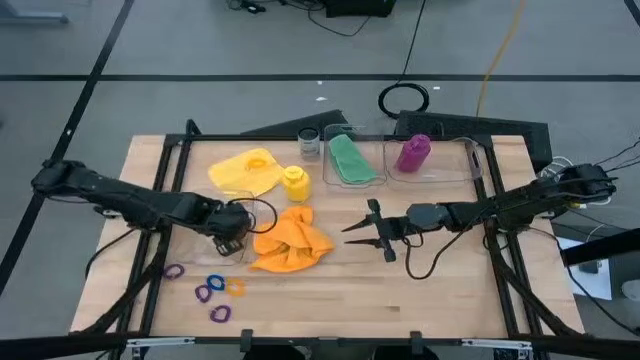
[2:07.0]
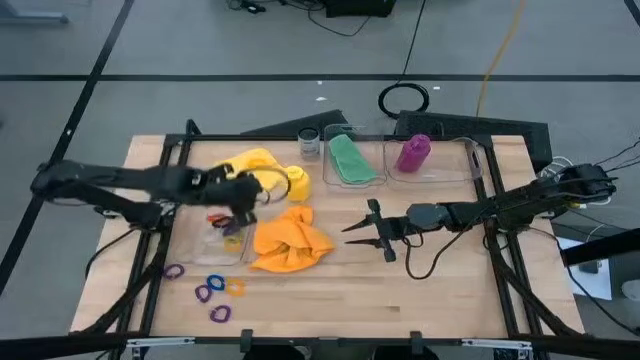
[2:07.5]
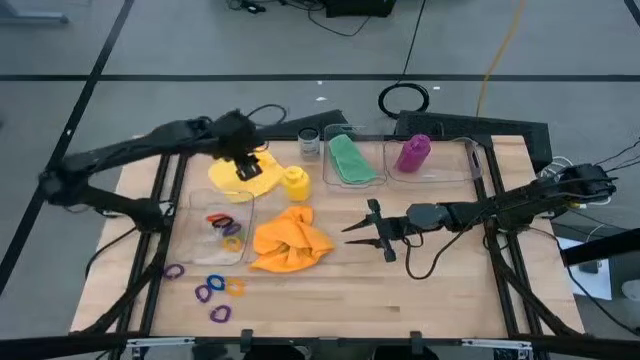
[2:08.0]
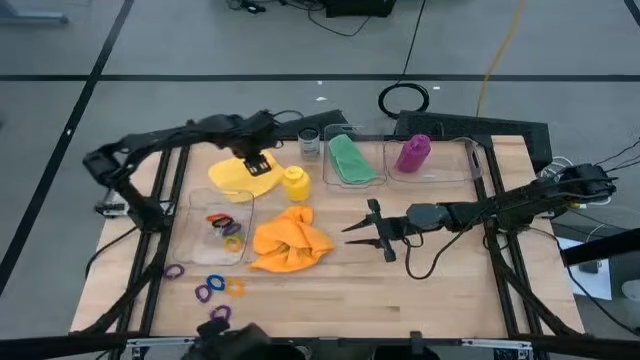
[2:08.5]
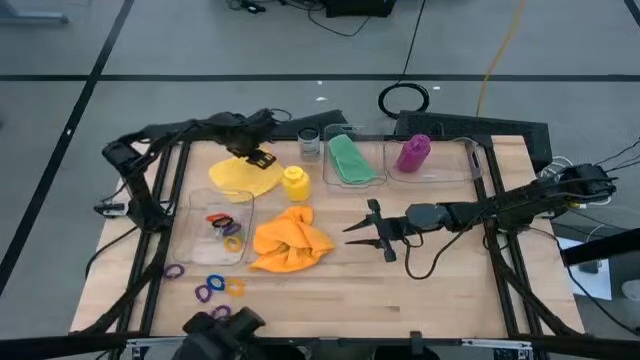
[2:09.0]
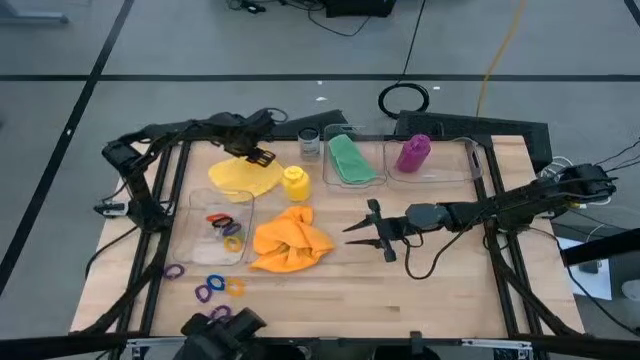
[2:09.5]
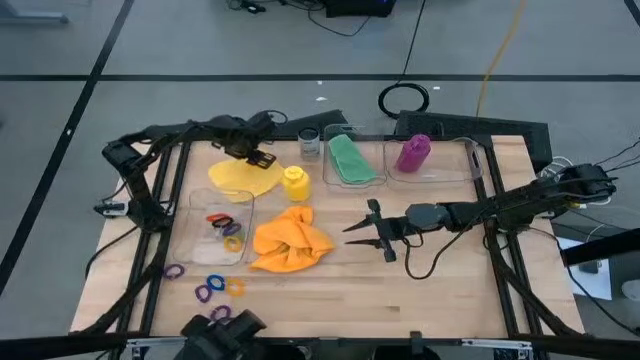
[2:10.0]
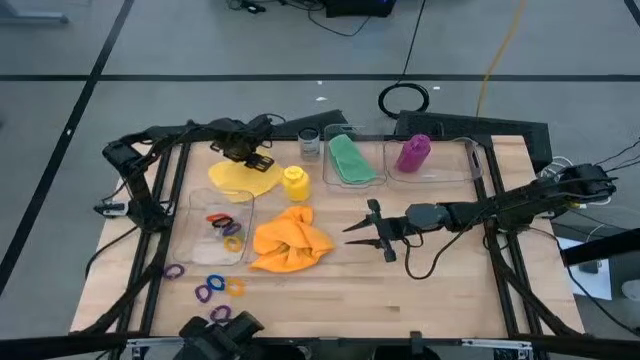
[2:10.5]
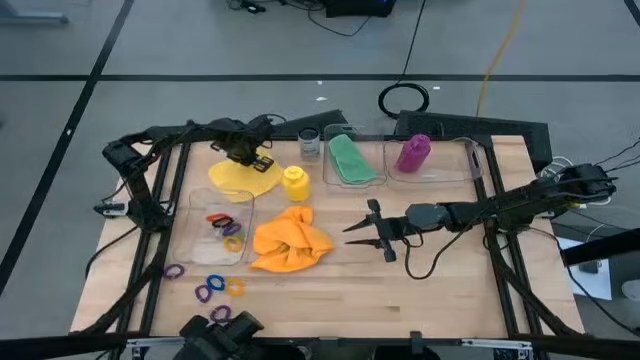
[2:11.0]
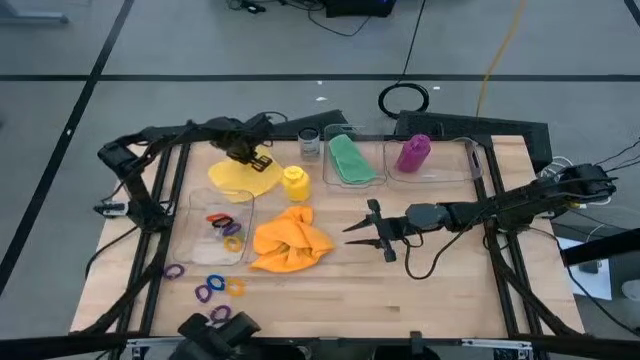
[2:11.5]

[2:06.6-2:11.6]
Task: Pick & Place Sports Items
Put the top yellow spring keychain into the bottom transparent bin

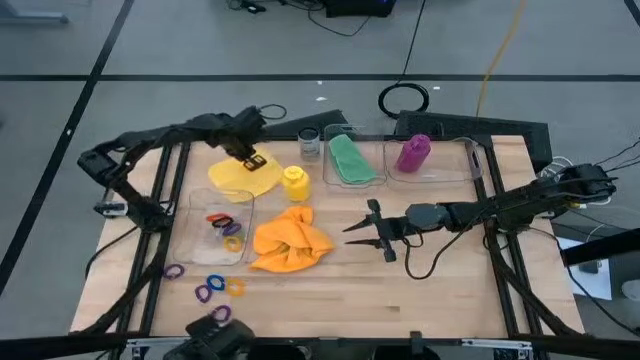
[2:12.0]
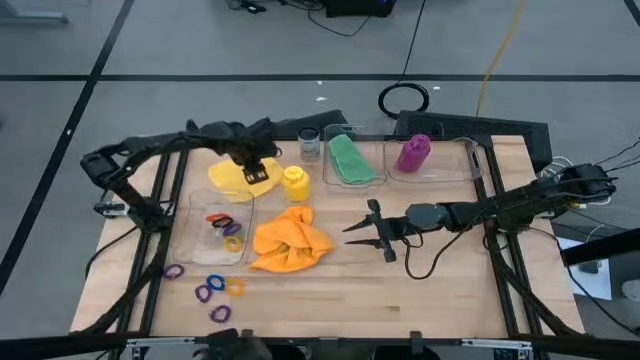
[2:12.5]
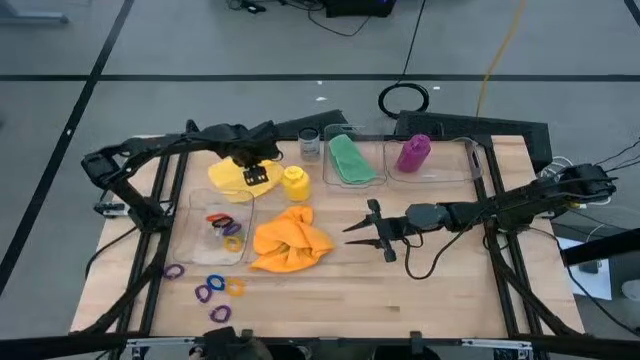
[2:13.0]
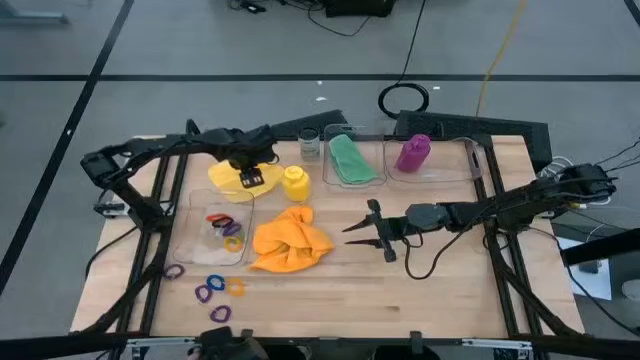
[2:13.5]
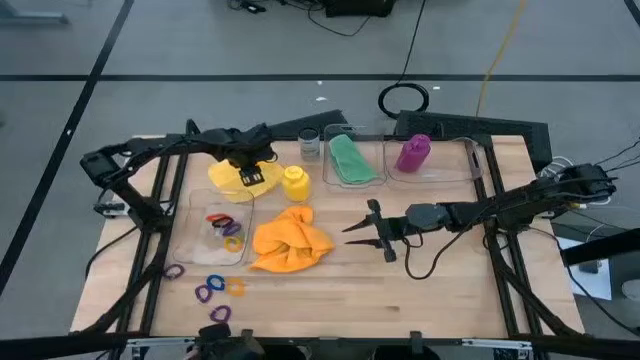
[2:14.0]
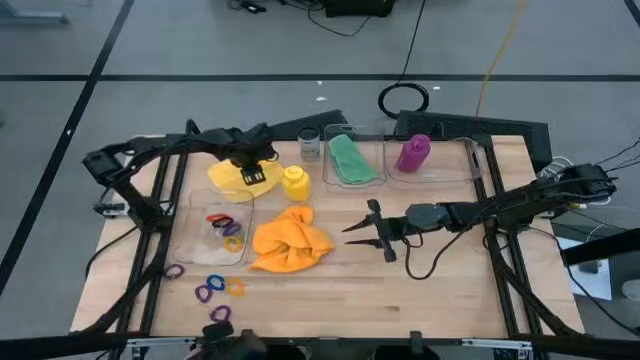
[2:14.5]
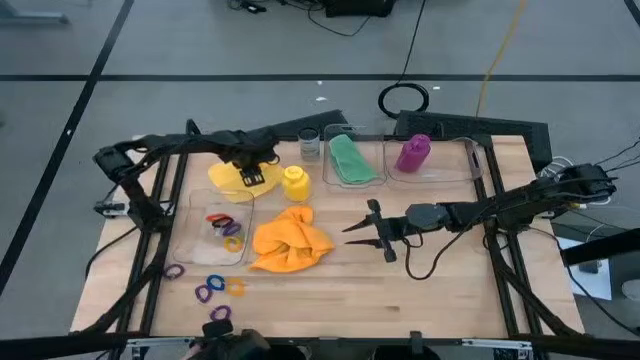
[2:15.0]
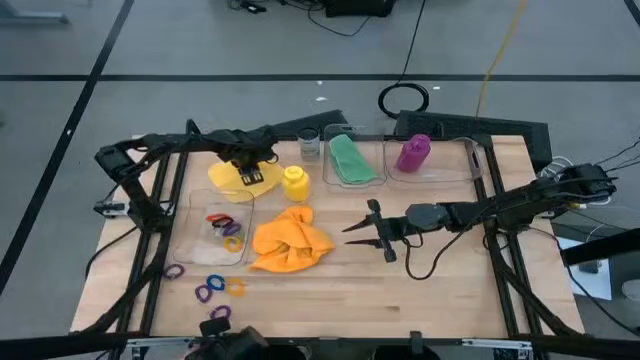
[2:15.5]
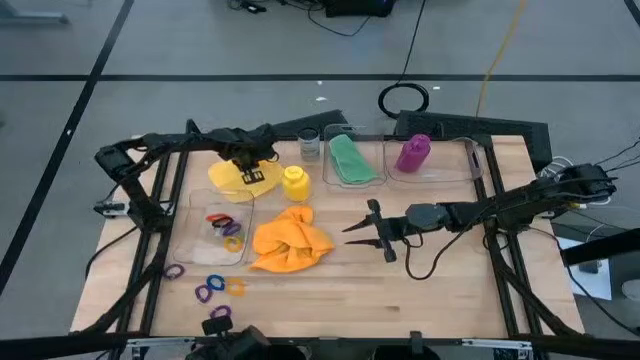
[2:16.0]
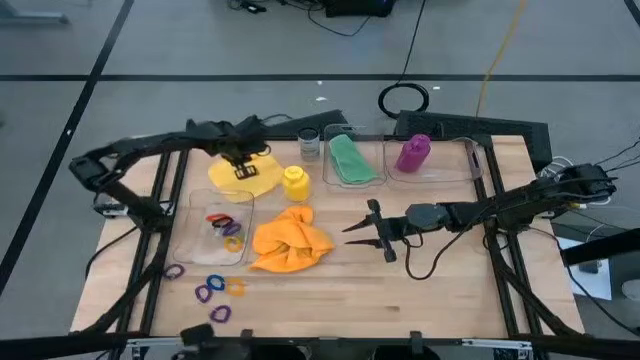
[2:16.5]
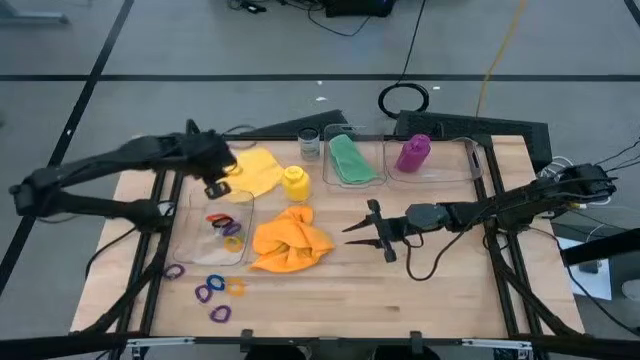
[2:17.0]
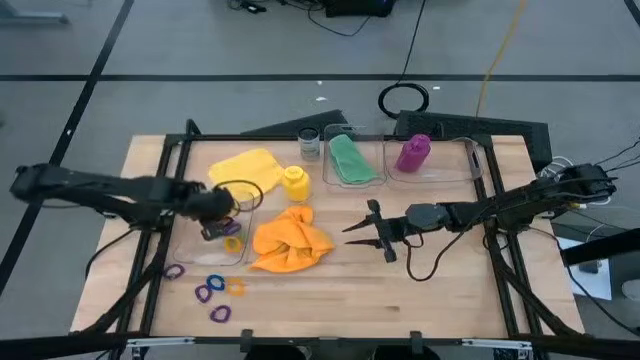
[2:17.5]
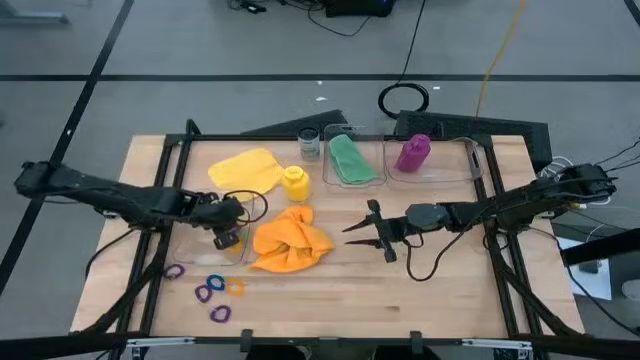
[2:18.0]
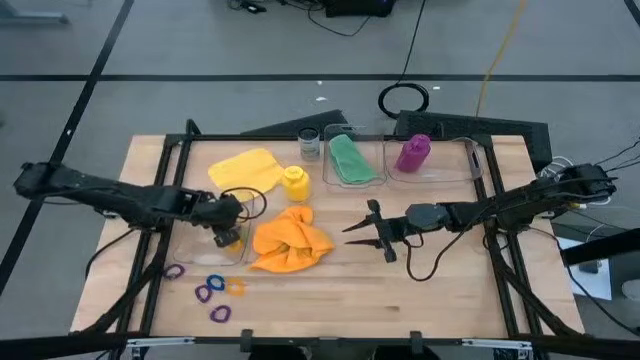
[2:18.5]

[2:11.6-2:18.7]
Put the top yellow spring keychain into the bottom transparent bin
